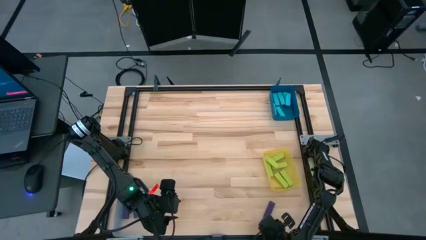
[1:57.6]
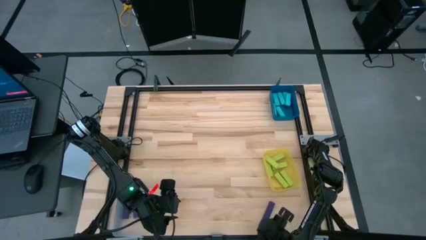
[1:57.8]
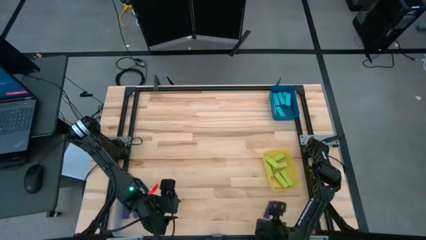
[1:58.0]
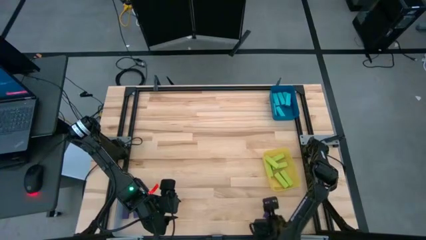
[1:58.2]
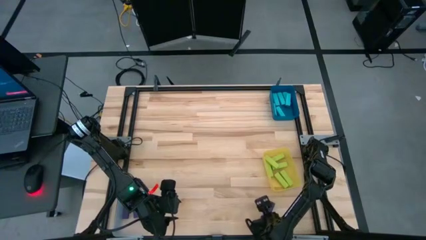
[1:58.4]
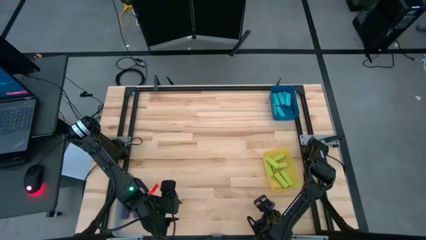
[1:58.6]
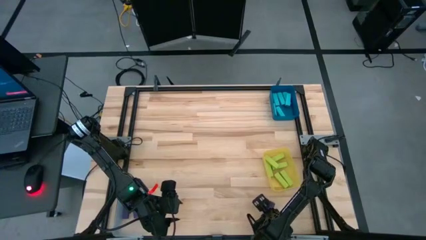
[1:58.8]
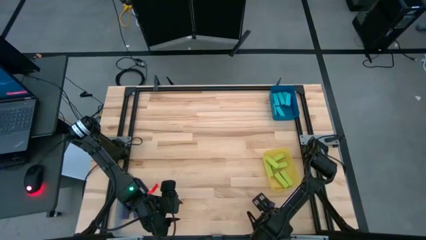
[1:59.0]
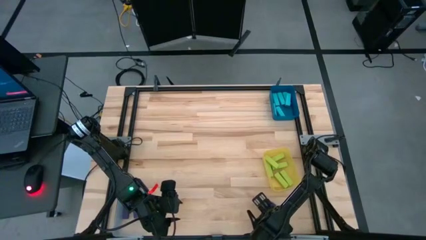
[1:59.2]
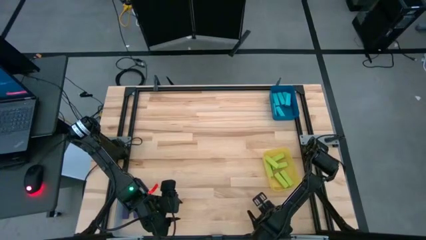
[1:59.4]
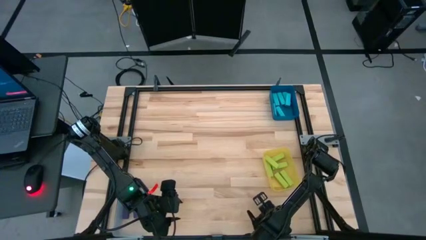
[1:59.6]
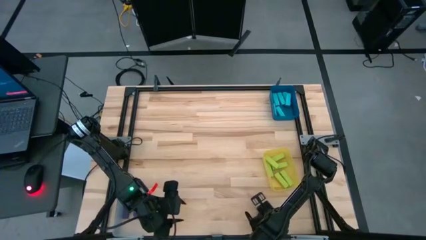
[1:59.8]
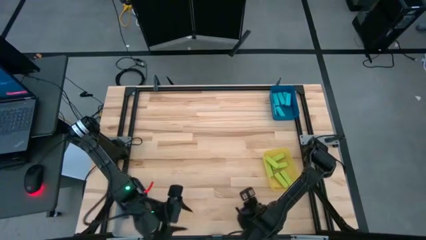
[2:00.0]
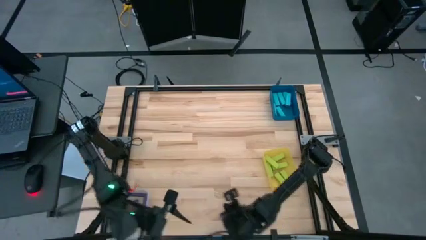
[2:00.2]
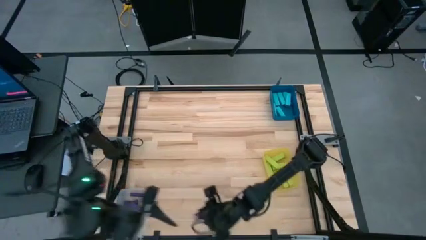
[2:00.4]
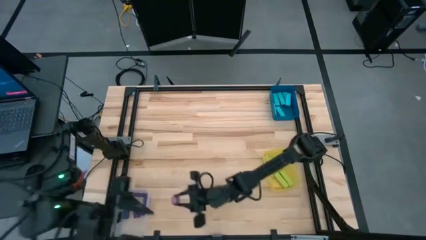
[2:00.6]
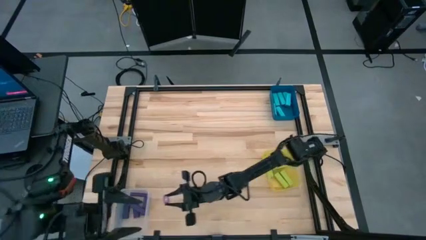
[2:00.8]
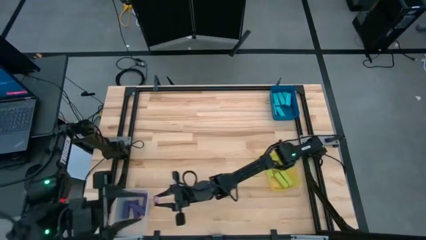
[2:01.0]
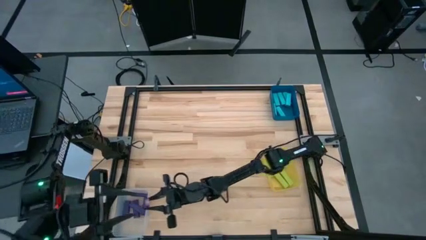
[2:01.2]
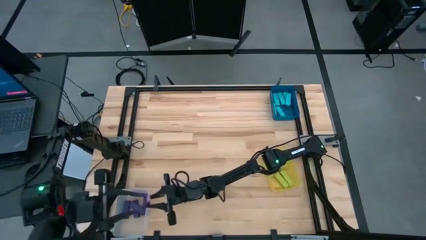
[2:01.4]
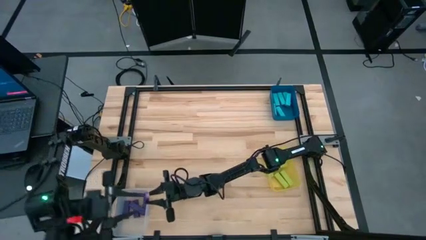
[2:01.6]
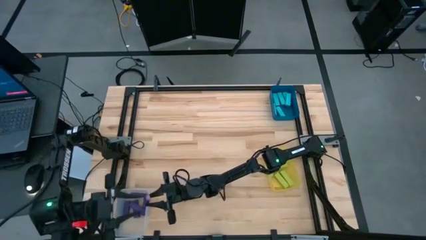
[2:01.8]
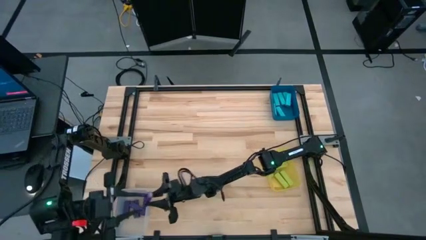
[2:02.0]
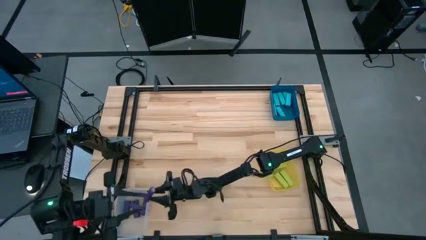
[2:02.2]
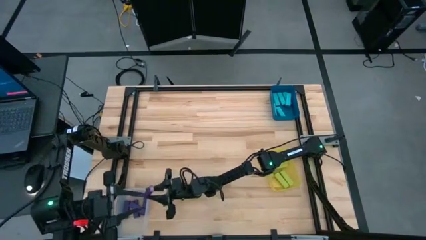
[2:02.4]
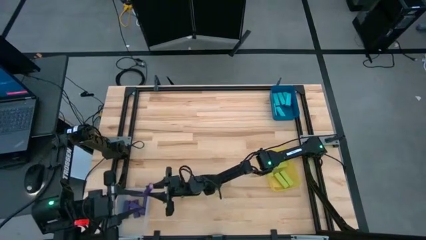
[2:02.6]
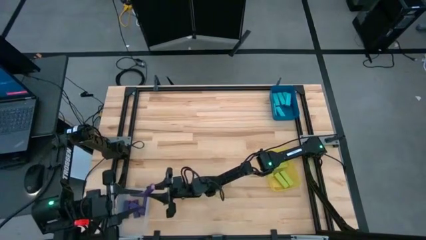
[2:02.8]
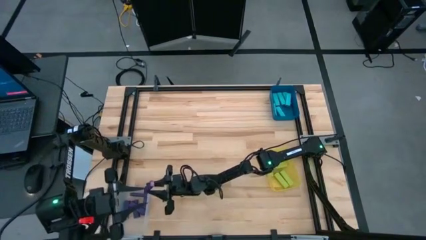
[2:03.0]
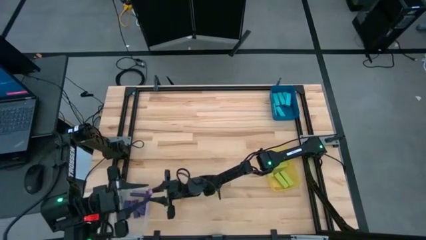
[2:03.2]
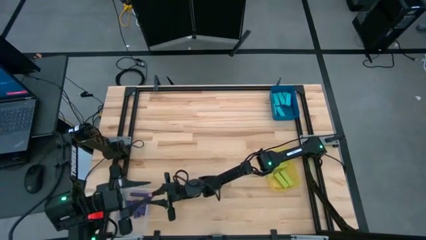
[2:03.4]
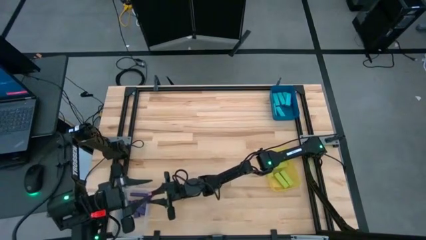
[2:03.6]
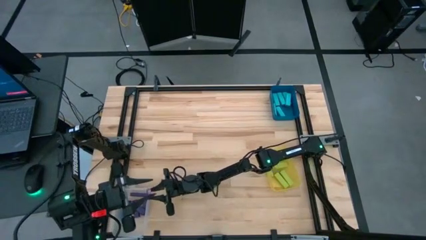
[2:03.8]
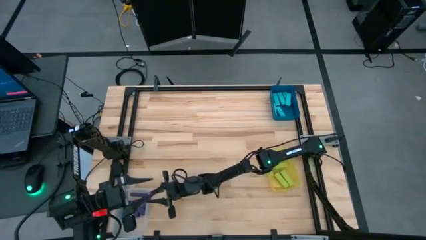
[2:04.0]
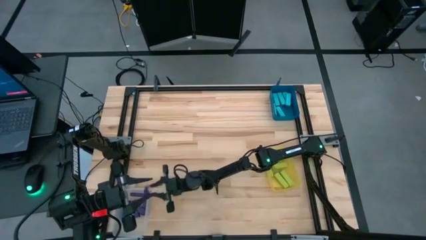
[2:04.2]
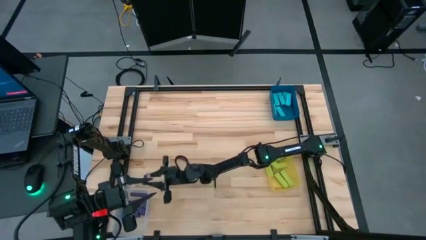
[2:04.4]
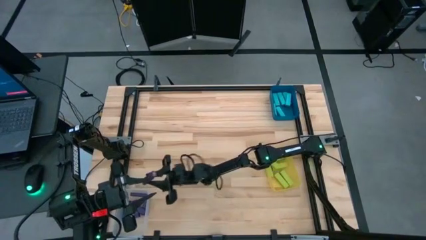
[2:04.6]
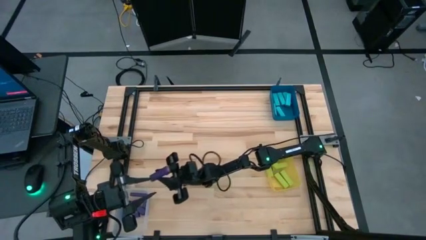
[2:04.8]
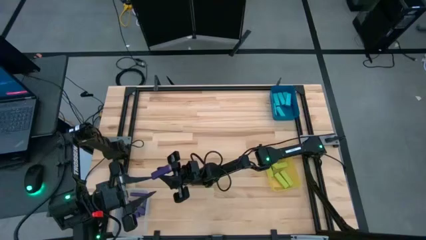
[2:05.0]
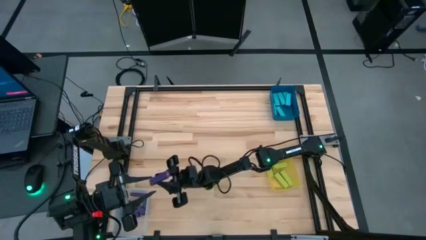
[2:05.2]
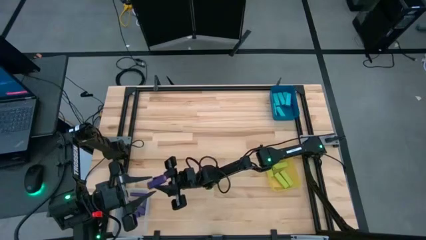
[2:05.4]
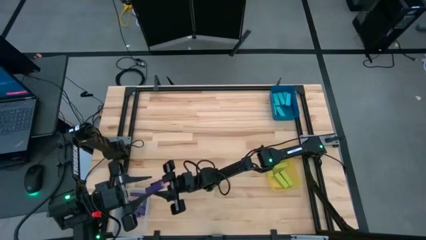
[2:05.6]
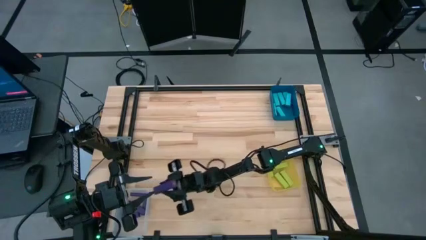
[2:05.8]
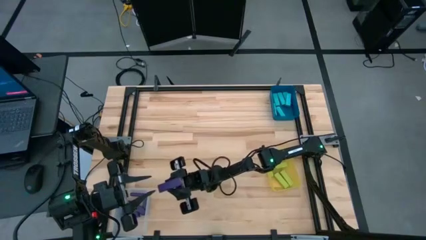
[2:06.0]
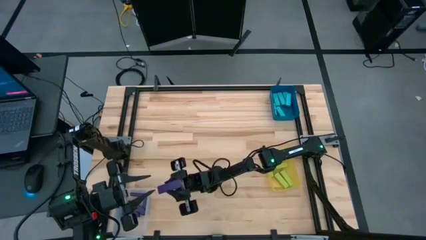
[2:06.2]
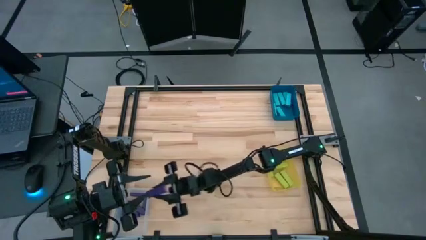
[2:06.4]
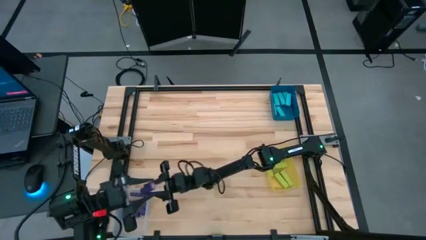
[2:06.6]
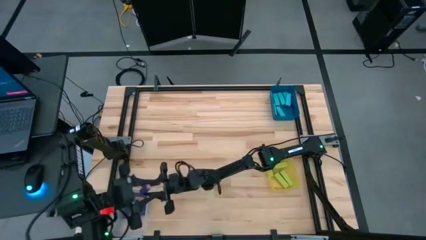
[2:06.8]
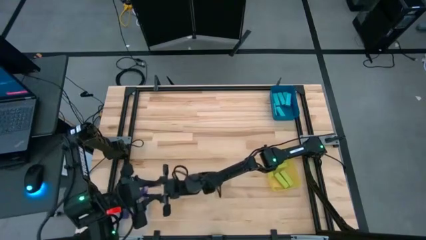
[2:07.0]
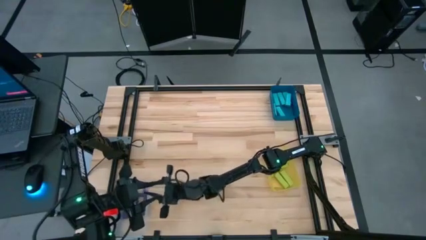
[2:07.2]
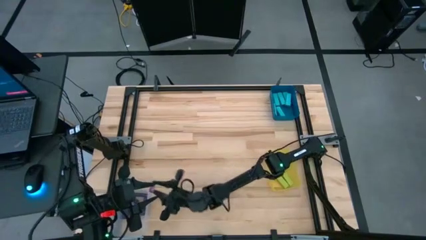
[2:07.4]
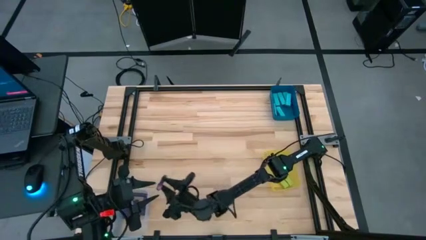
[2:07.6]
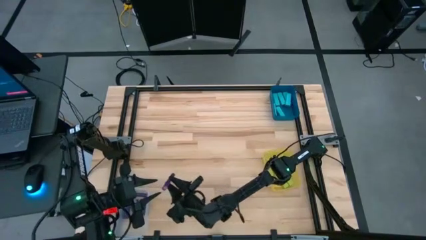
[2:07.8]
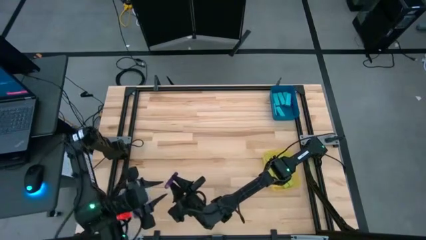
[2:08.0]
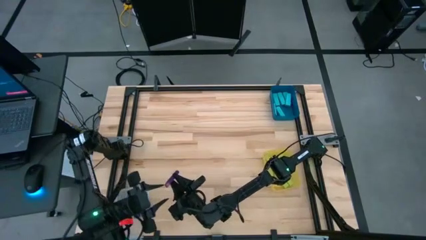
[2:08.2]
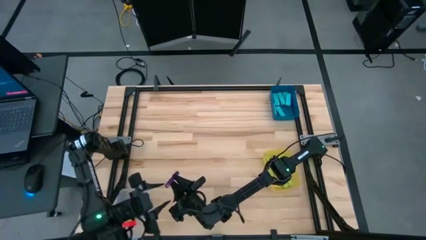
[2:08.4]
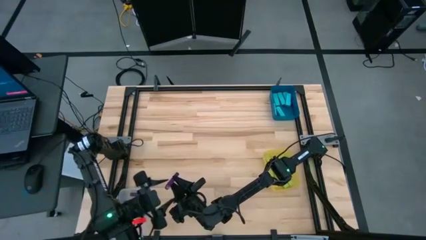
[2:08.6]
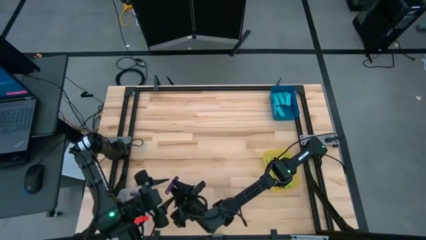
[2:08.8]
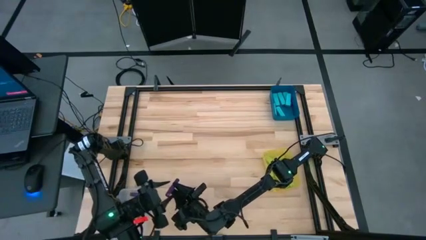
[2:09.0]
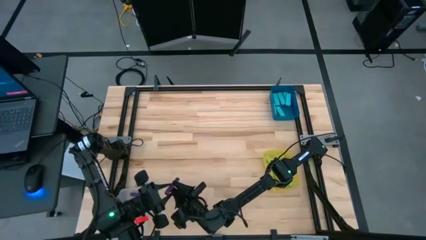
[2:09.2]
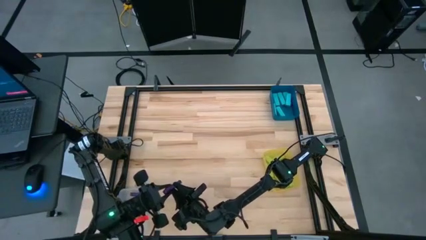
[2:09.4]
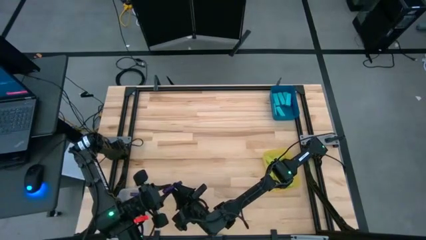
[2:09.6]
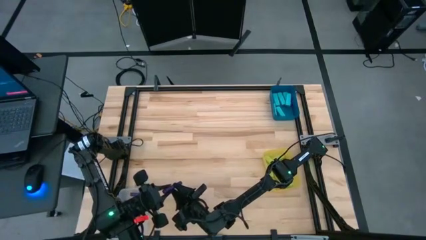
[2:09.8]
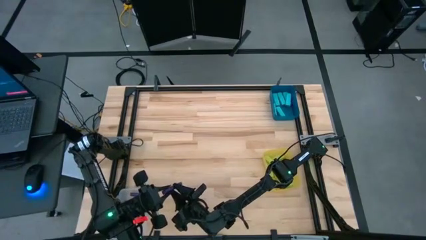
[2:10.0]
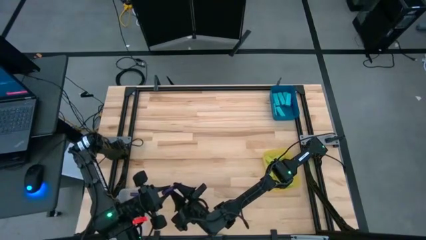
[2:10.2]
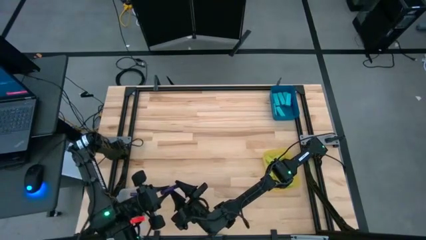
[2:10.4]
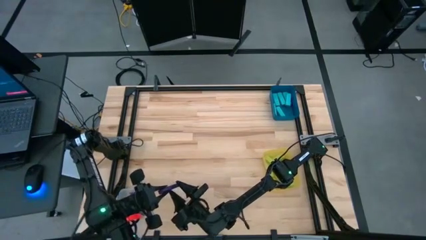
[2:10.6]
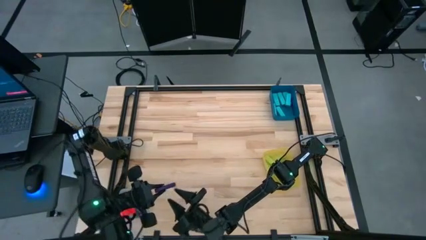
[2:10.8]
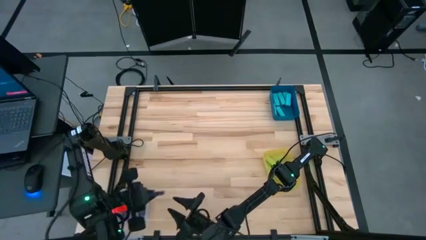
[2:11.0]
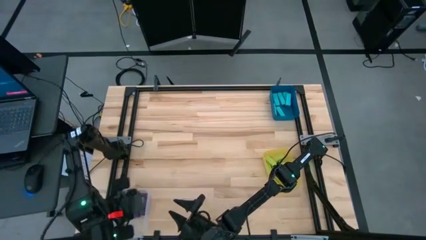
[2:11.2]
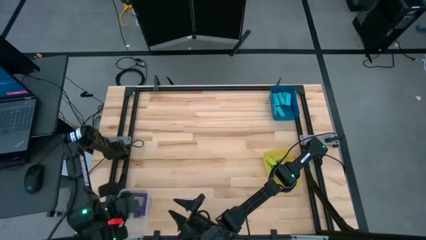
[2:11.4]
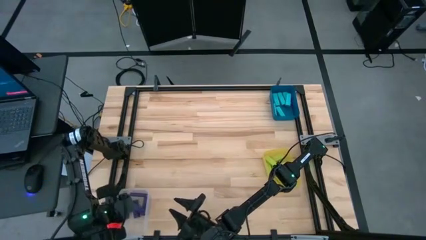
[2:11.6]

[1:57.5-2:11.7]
Task: Sort blocks
Put the violet block into the transparent bin
